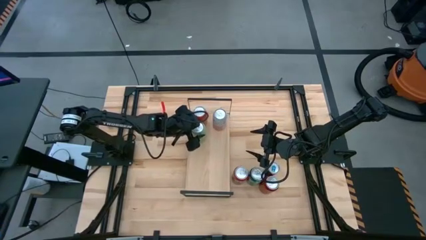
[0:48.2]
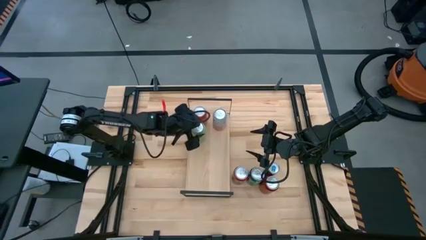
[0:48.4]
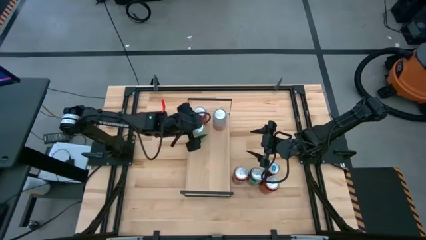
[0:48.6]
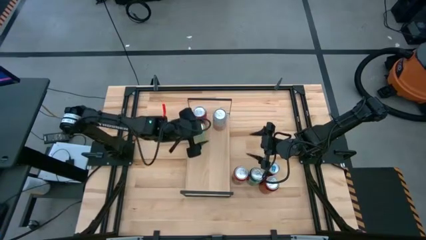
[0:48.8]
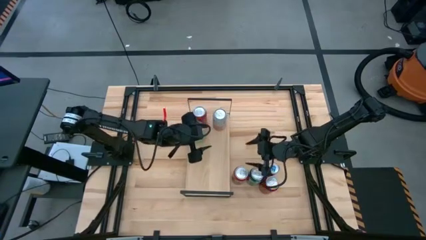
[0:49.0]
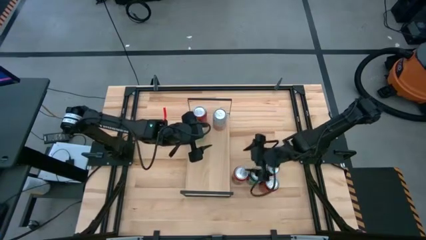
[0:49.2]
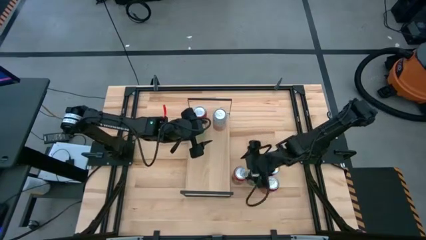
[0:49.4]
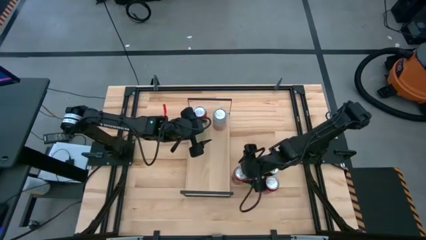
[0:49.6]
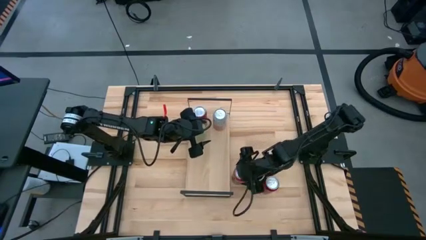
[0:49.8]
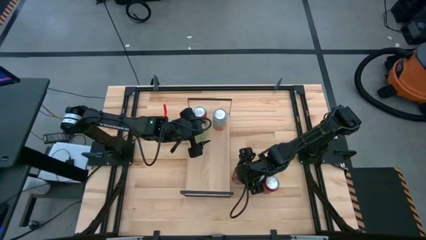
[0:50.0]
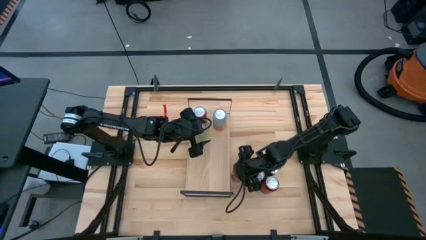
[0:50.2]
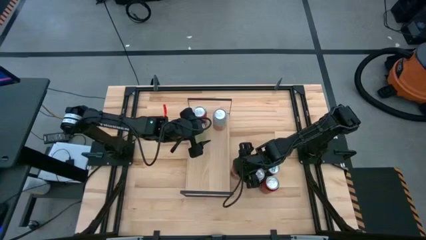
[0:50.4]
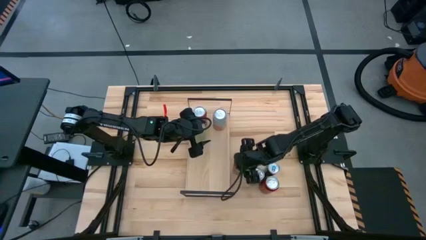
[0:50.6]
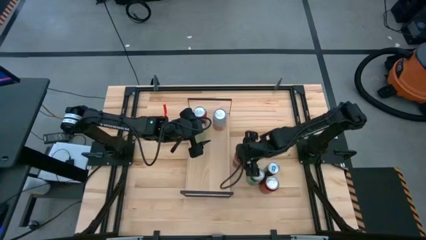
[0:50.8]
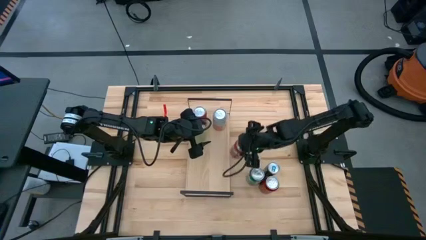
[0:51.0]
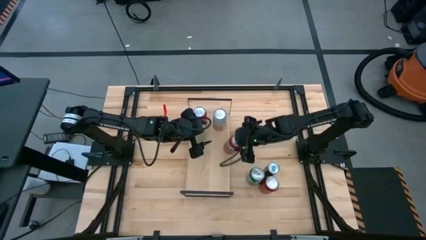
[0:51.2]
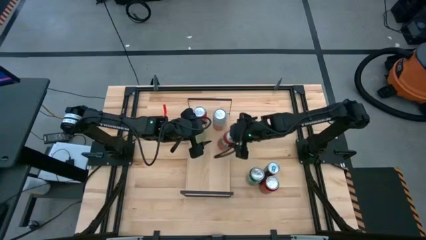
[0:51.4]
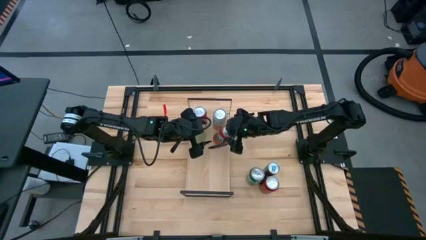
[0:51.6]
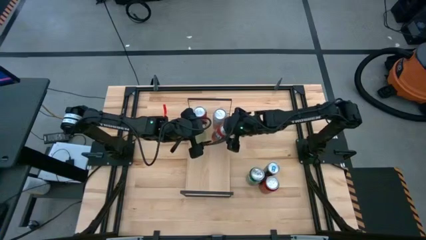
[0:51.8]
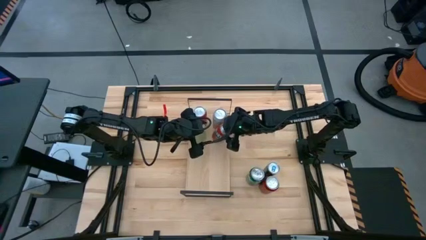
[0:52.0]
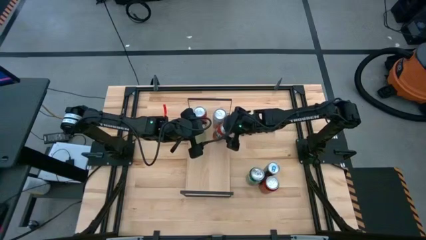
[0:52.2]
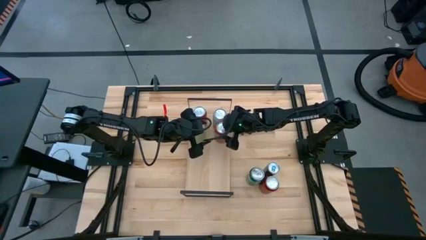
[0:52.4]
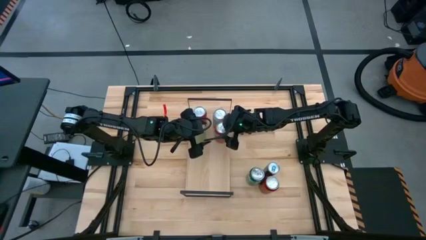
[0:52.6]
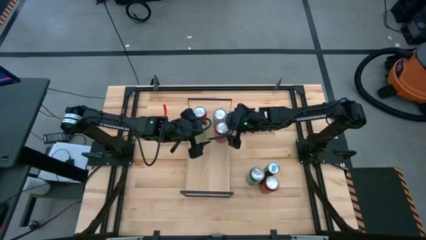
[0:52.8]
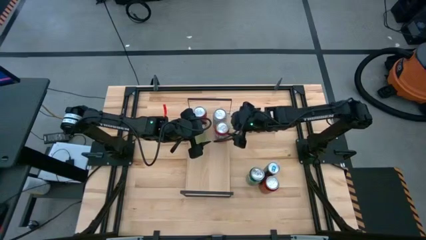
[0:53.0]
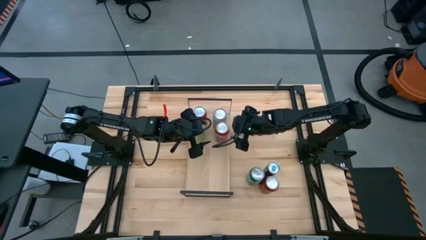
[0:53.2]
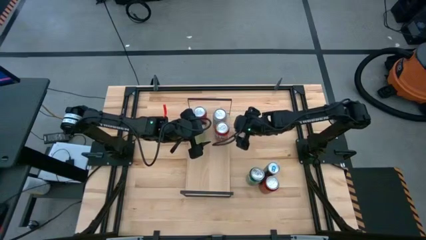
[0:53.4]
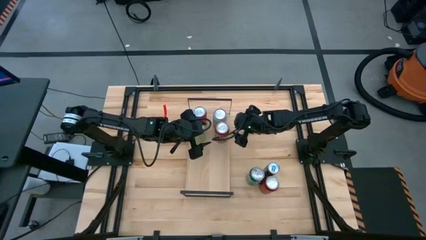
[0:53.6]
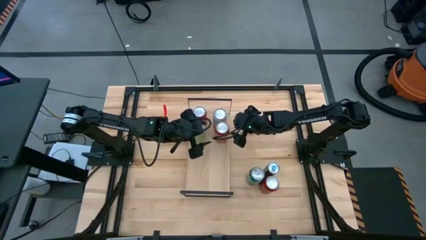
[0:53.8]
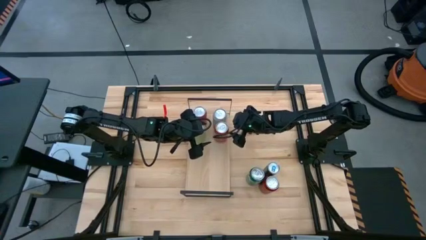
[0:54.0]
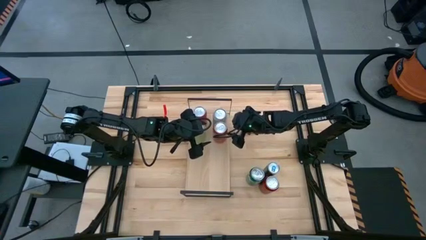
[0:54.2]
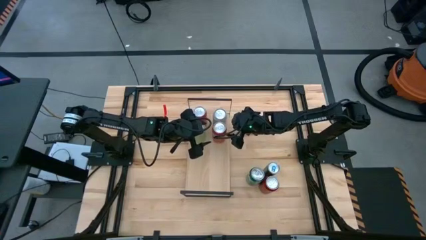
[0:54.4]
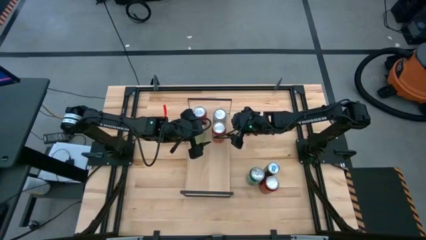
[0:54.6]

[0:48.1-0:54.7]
Task: Place canned beverage on shelf
Put the red soda can on the shelf

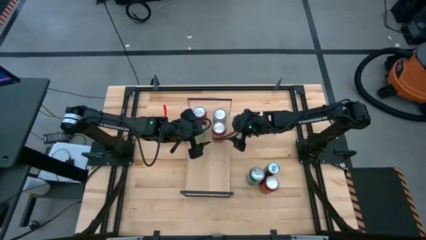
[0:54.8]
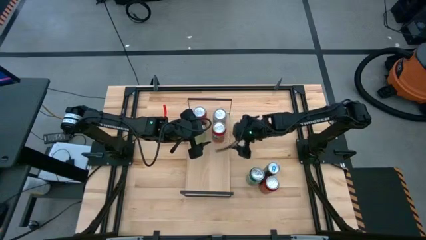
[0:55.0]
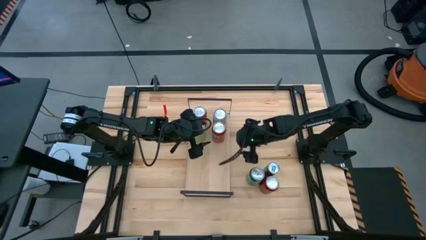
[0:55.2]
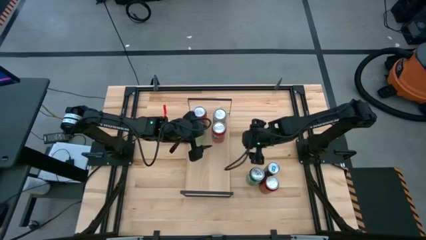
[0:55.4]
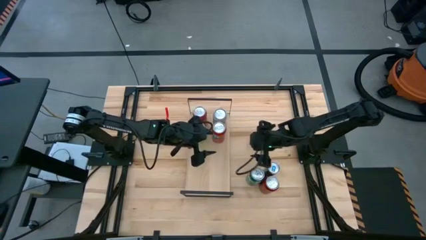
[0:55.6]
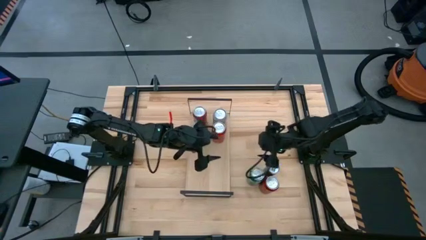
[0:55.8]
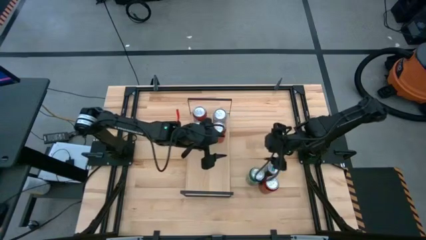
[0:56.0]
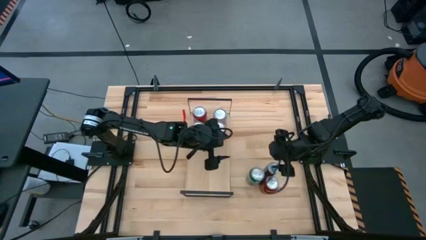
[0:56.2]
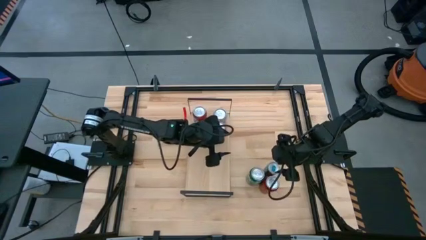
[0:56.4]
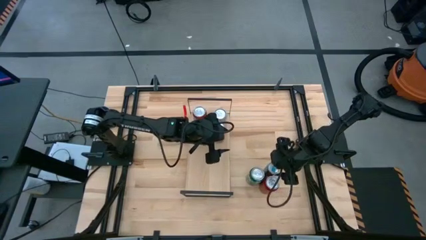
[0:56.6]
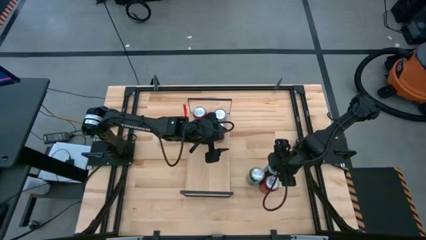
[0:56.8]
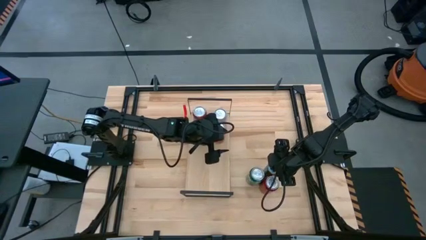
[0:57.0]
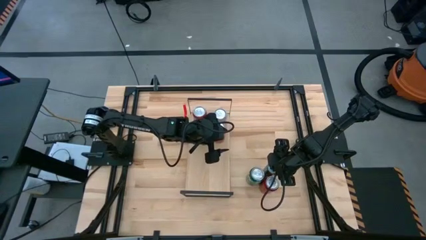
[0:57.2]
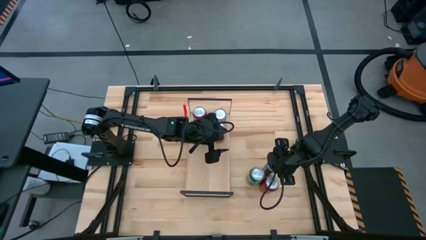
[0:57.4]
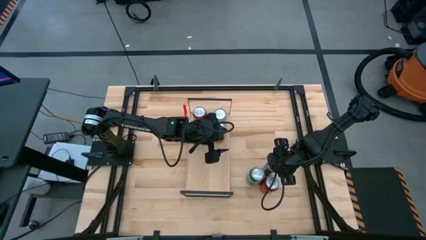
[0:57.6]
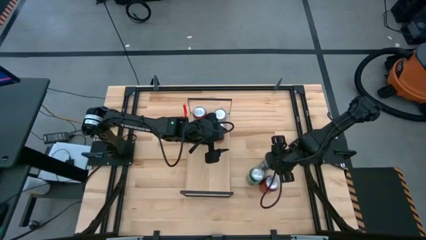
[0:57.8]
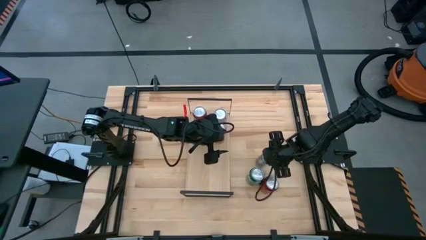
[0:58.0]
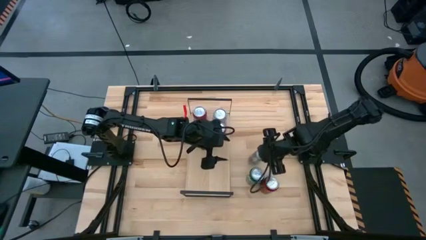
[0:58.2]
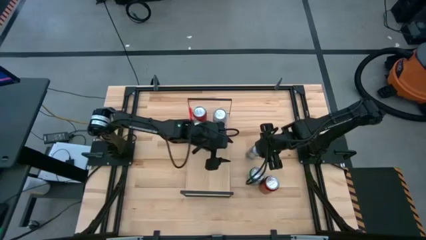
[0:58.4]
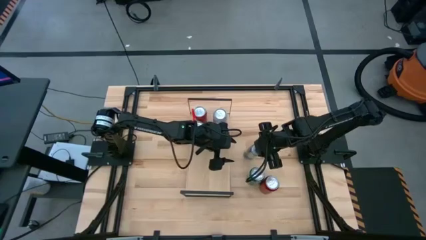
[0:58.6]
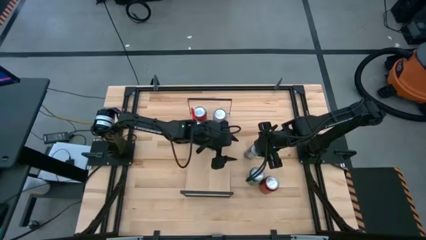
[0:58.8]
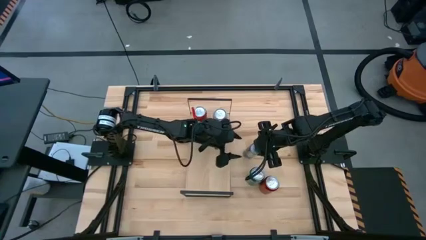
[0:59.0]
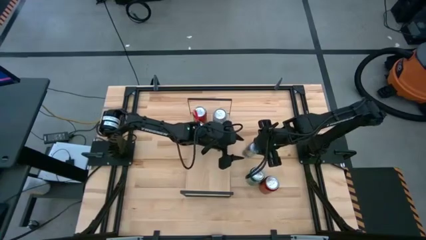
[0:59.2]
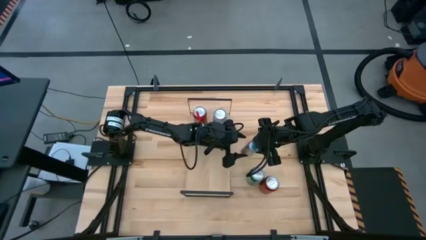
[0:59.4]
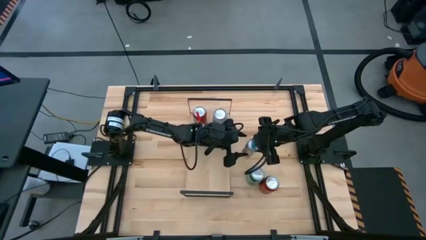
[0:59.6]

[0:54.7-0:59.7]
Put the blue soda can on the shelf
